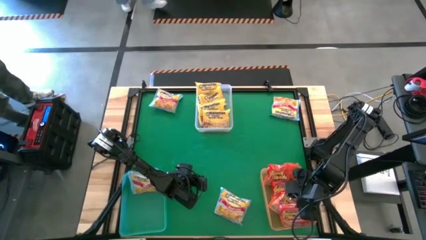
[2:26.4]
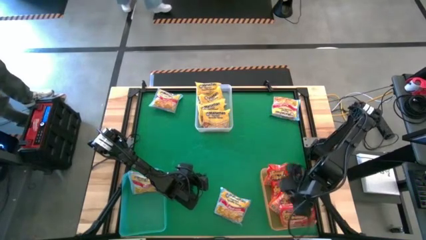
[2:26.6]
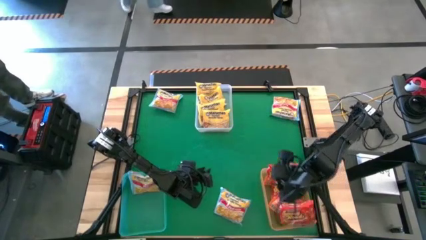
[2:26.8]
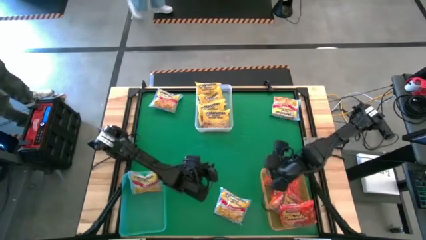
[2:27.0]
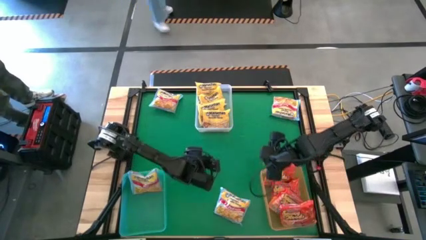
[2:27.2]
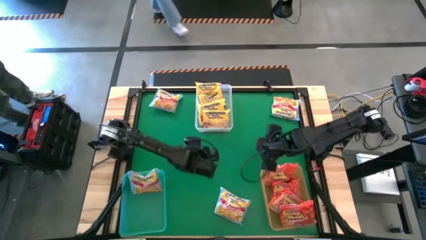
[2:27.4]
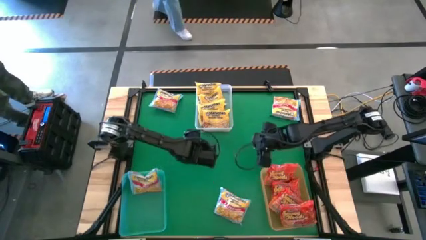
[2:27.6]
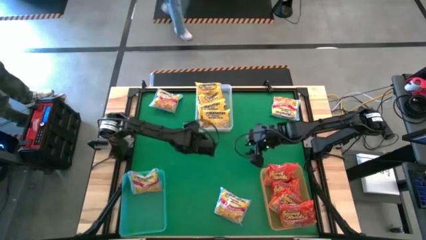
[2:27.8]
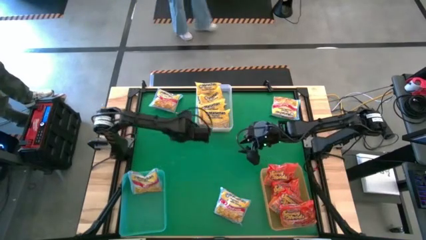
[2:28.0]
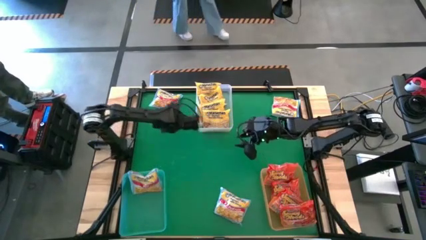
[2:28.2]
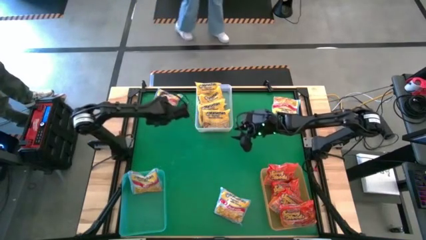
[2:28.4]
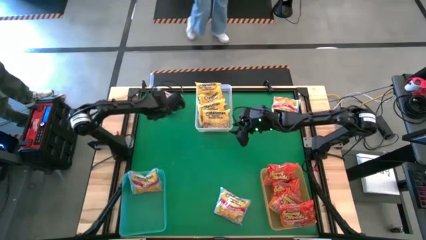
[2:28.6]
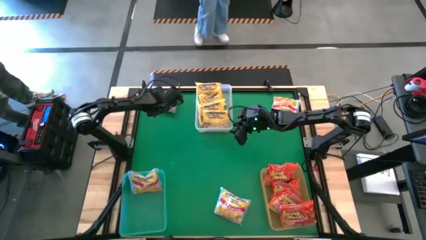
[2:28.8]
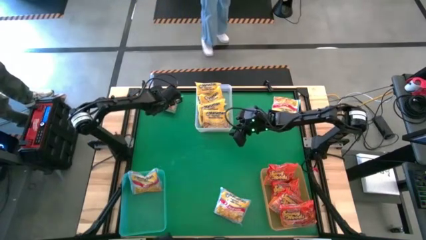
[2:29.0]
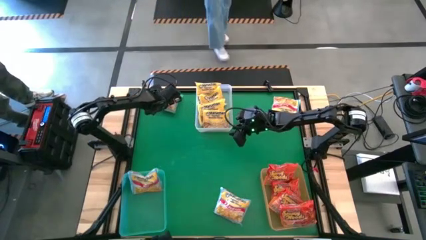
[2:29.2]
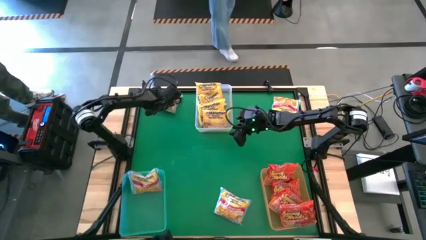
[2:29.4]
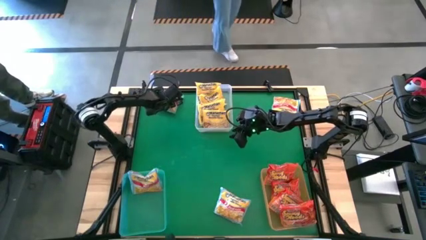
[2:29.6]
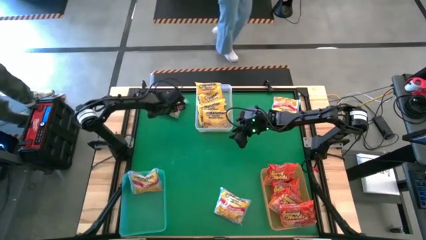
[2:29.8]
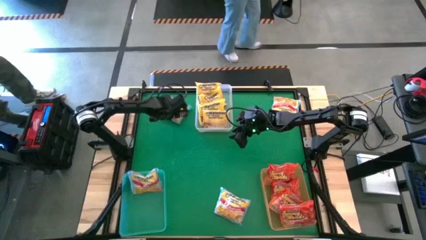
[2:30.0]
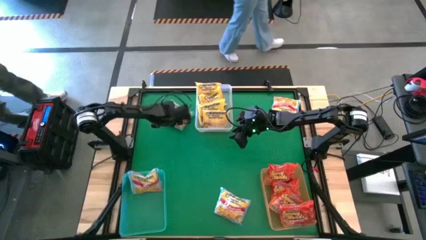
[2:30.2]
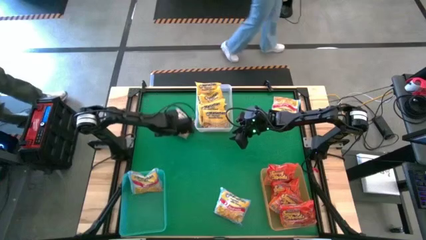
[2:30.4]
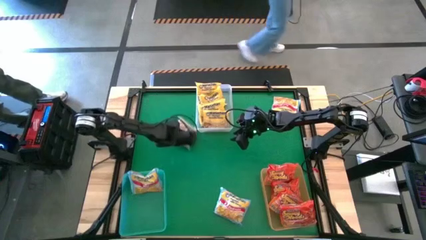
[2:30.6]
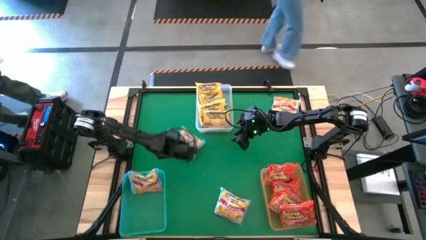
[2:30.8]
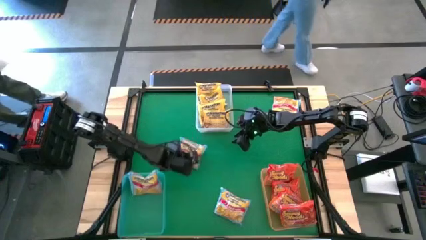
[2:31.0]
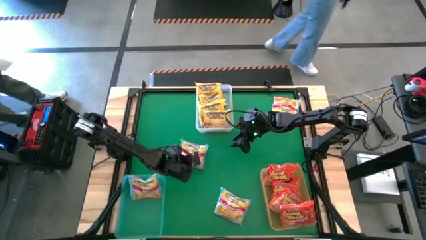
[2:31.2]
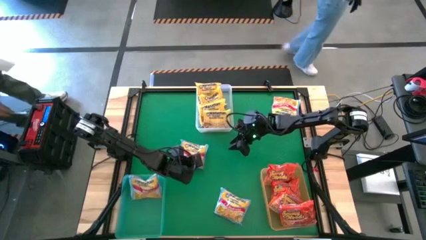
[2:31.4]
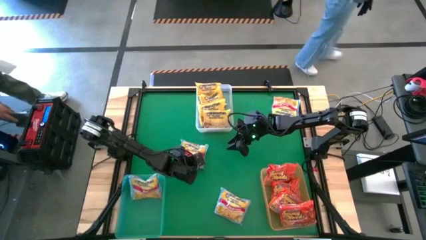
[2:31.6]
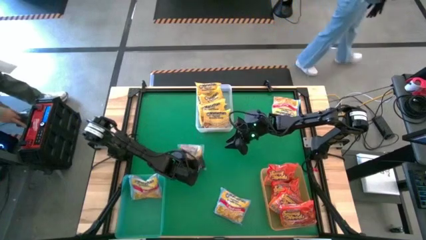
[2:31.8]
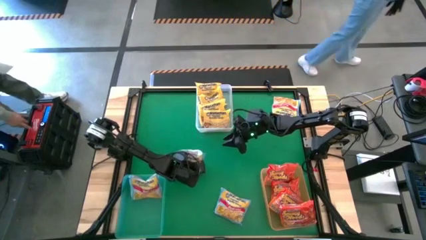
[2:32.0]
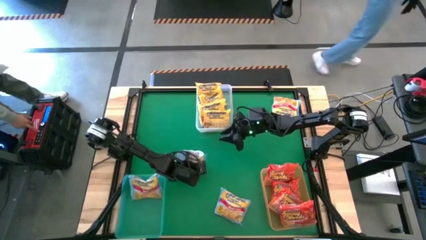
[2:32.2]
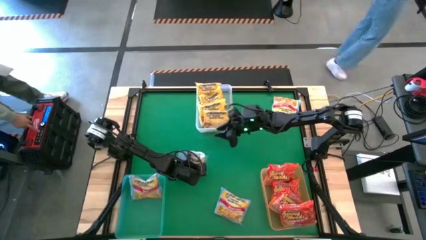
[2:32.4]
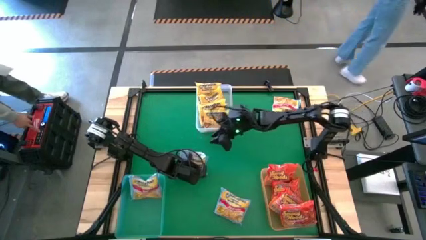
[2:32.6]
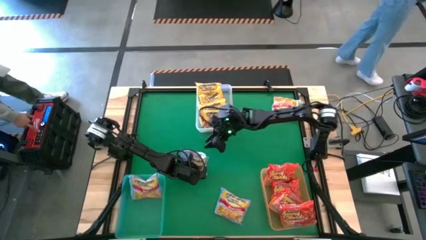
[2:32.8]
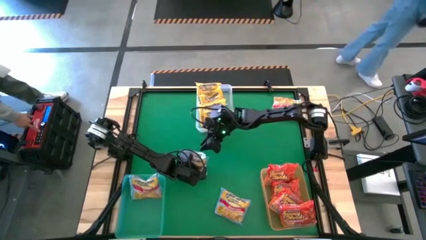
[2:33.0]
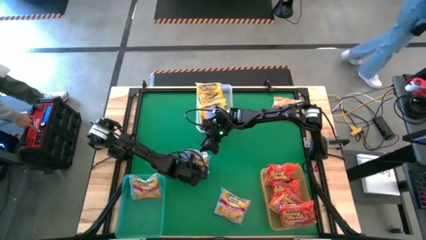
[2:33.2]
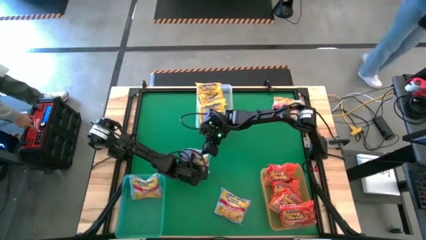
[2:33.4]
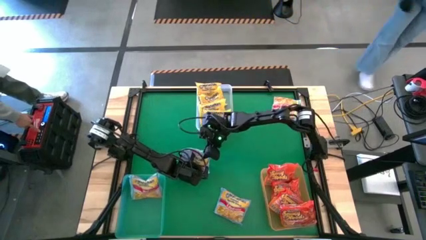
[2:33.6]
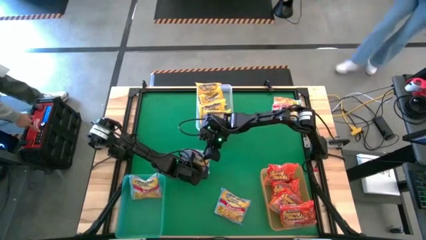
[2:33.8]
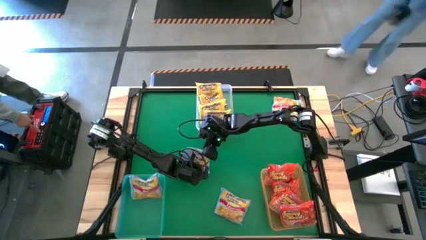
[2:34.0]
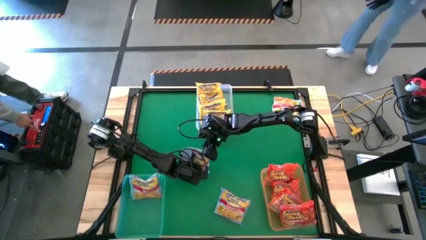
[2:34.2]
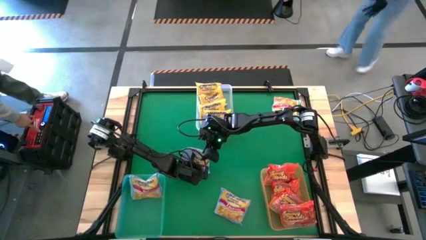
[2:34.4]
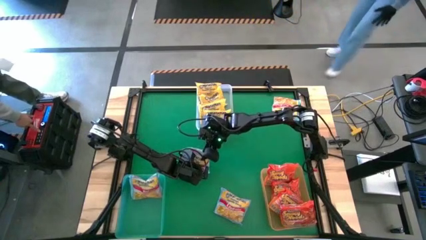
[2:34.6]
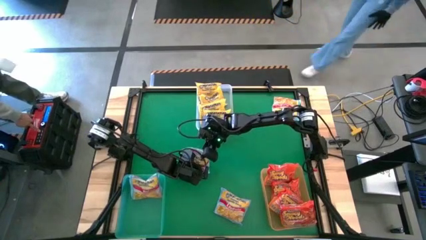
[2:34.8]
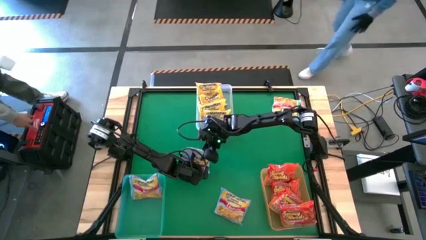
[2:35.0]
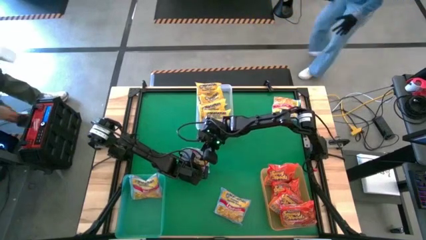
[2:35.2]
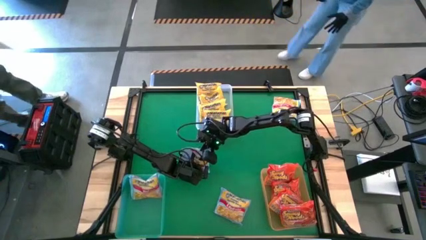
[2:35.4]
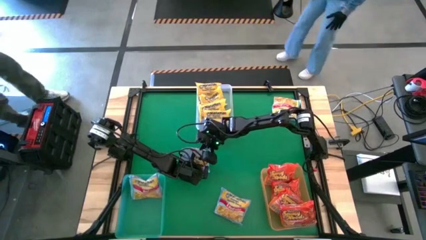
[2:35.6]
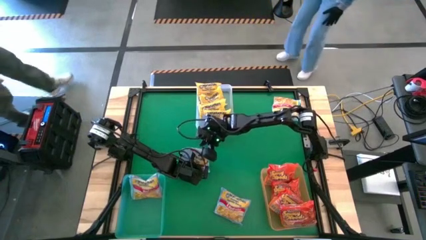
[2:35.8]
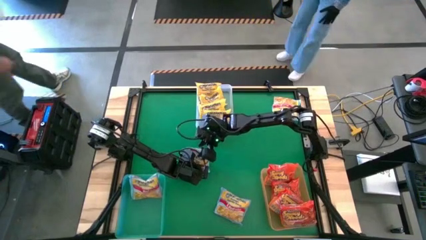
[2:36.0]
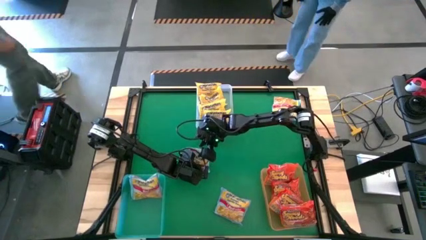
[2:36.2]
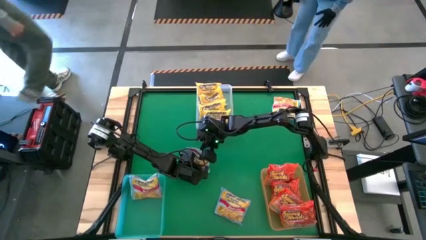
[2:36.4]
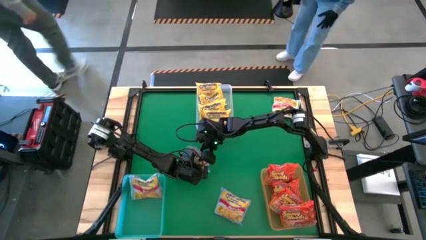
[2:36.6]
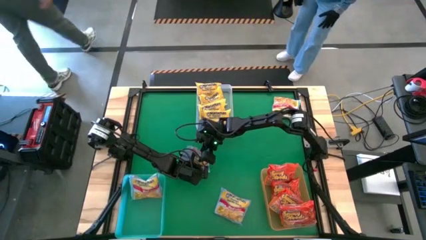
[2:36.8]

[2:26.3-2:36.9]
Task: Sort Maruchan noodles
Put the top left blue noodle pack into the blue bin

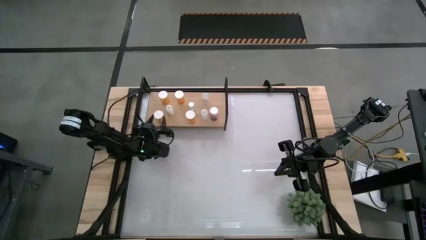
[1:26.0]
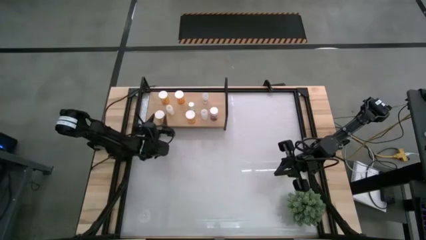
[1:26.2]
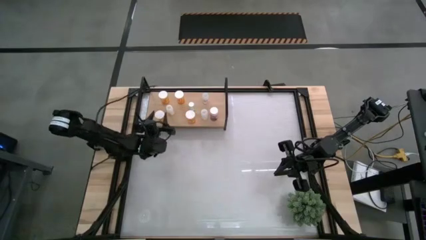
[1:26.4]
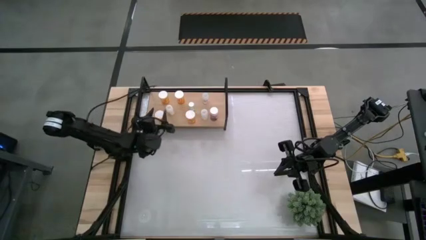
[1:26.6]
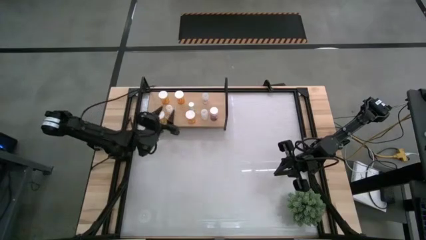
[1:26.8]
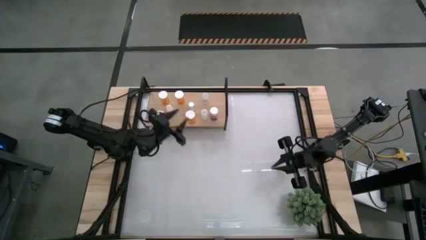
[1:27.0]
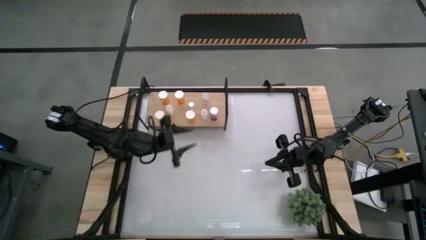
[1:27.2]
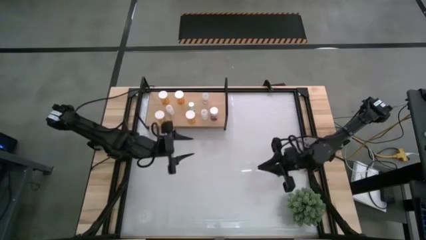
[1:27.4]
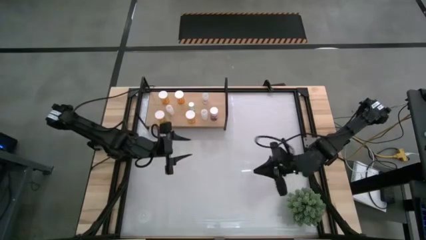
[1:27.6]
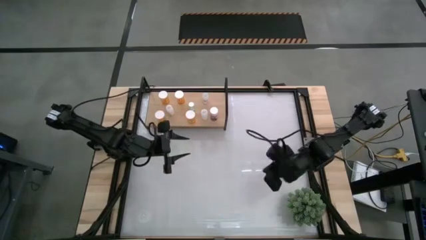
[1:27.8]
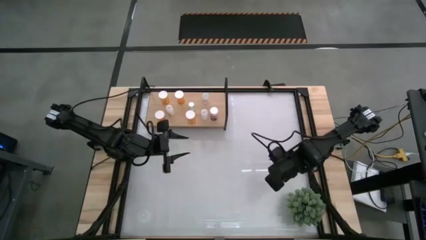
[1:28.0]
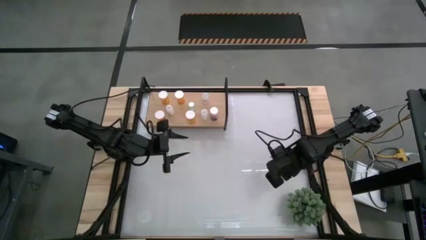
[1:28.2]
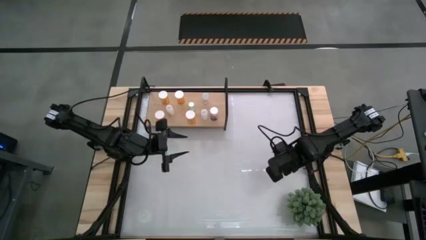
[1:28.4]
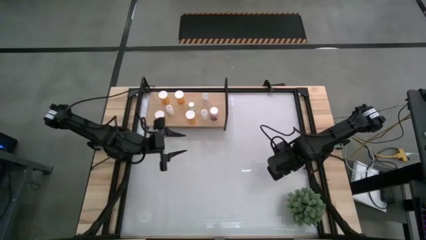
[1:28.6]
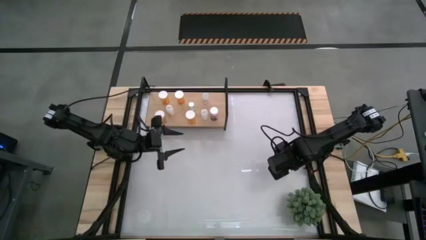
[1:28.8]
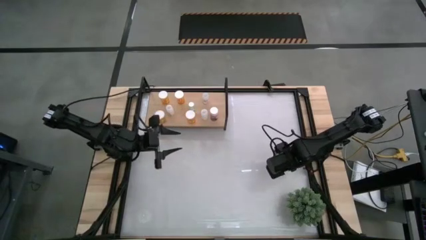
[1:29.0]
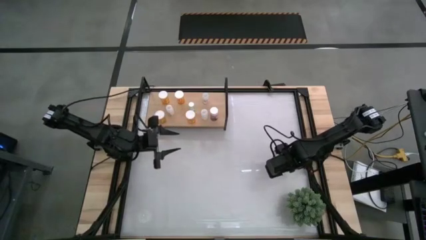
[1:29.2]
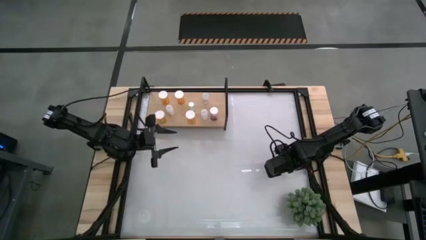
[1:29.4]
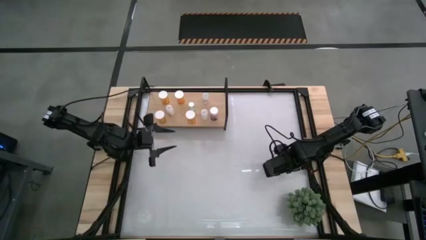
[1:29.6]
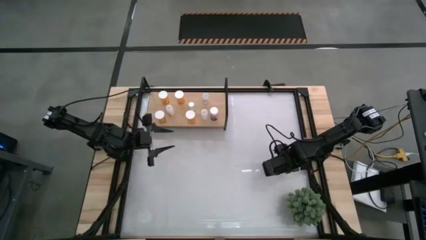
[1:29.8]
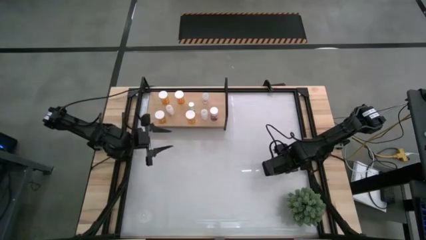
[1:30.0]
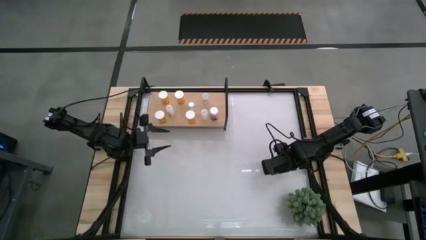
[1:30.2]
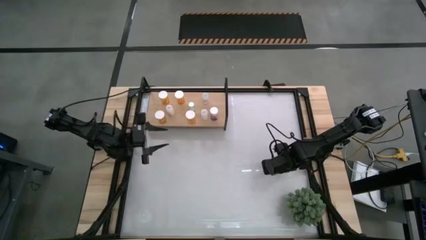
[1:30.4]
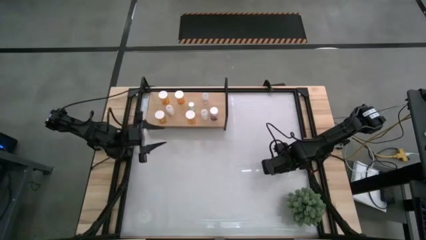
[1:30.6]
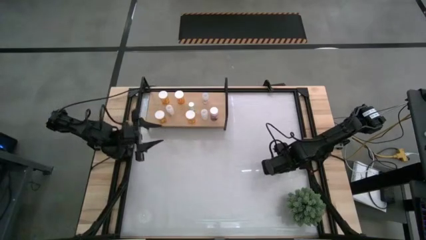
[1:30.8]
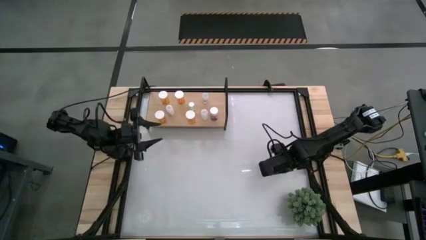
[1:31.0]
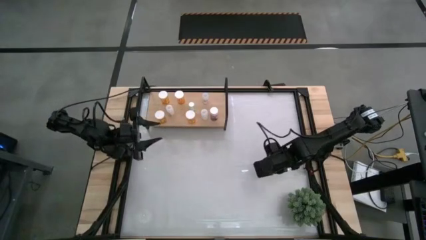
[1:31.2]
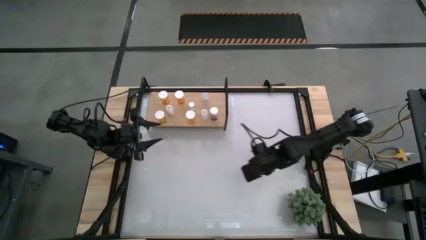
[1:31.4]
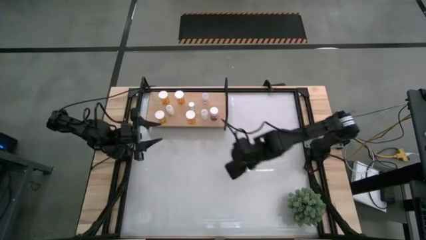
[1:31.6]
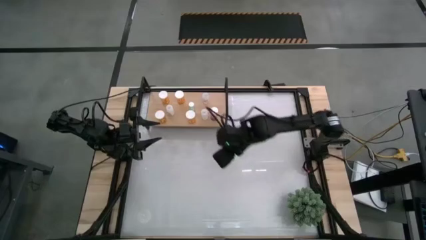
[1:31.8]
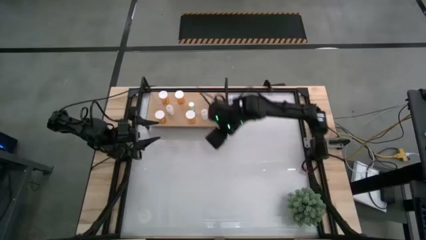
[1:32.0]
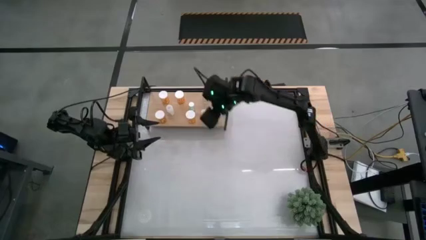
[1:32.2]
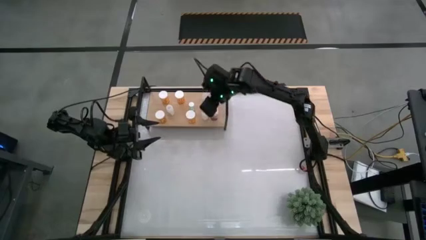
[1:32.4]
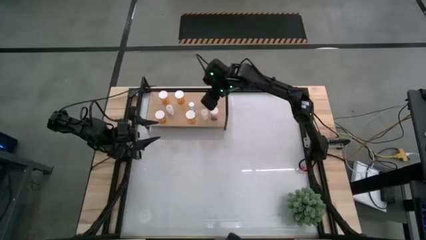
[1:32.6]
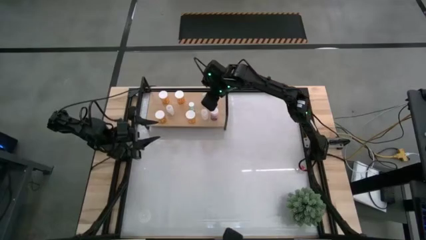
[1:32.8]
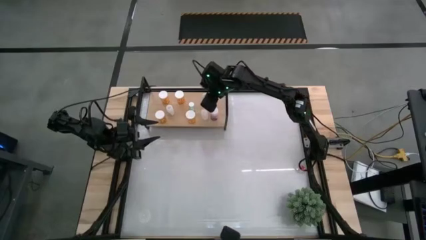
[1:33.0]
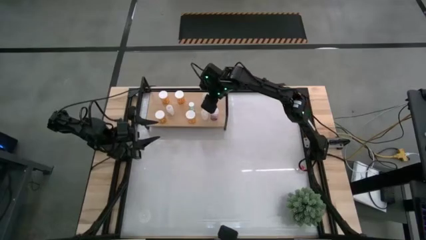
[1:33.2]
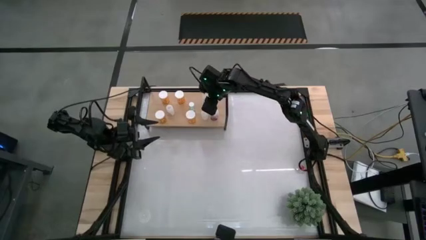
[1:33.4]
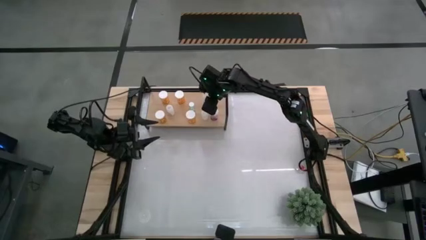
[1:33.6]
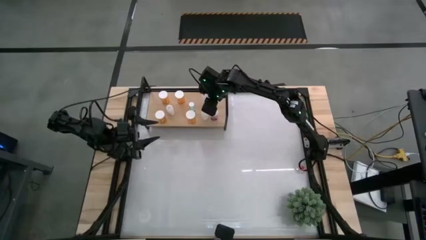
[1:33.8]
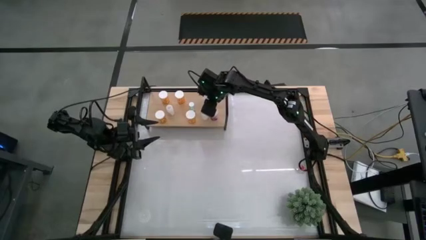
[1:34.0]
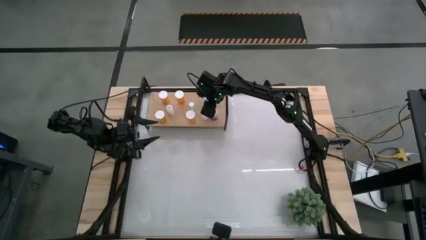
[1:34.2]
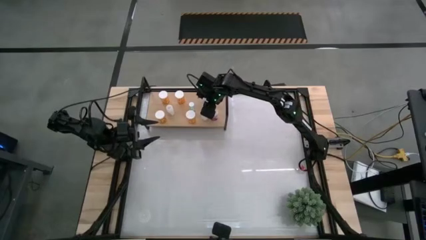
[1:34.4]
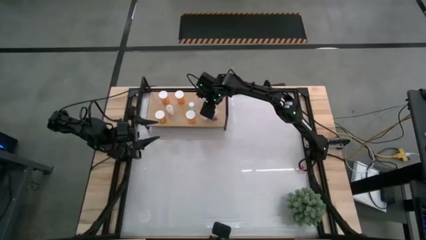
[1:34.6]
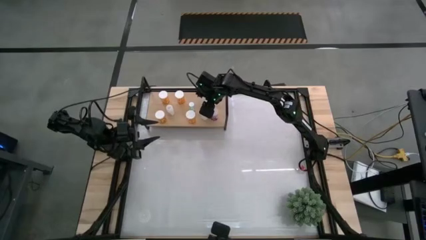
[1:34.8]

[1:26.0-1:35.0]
Task: Pick and place medicine bottles onto shelf by color
Put the small transparent pill bottle on the shelf
